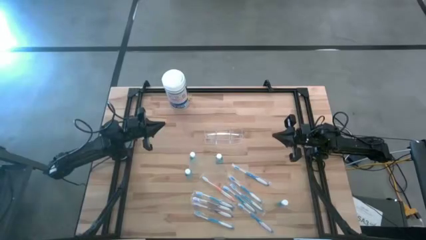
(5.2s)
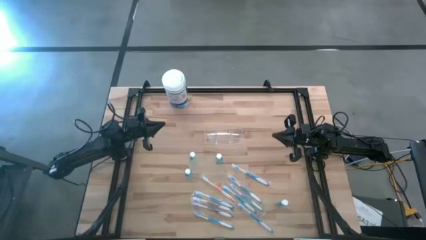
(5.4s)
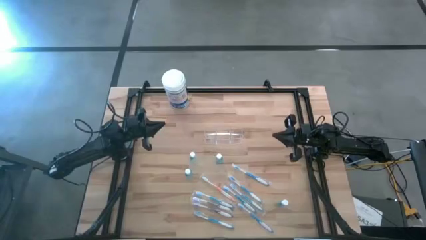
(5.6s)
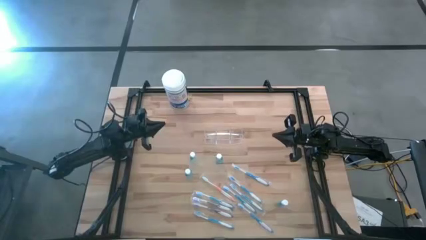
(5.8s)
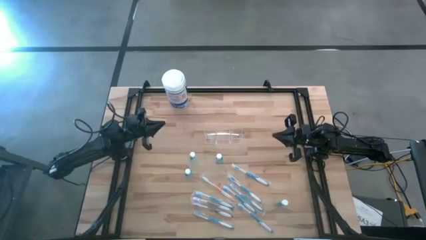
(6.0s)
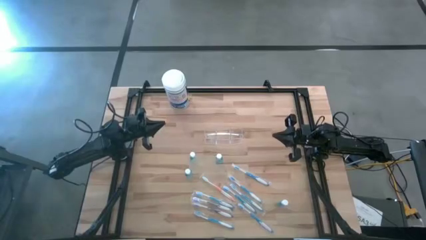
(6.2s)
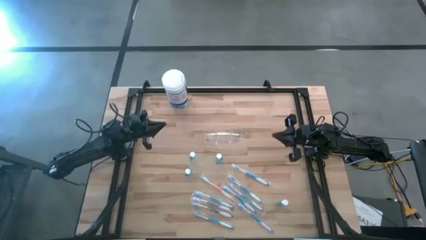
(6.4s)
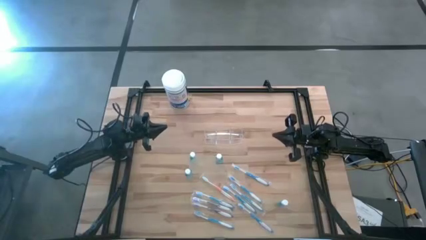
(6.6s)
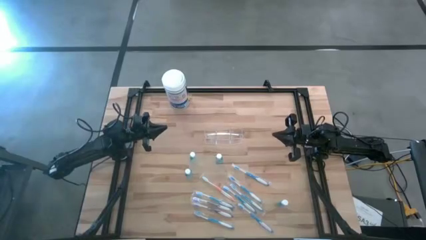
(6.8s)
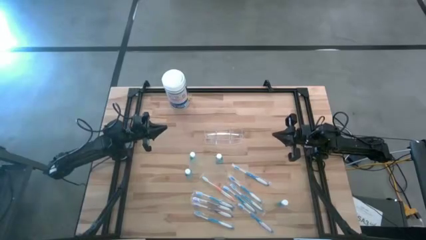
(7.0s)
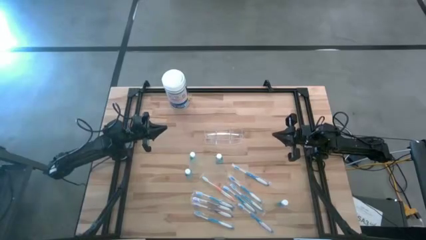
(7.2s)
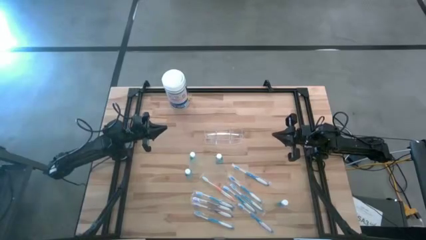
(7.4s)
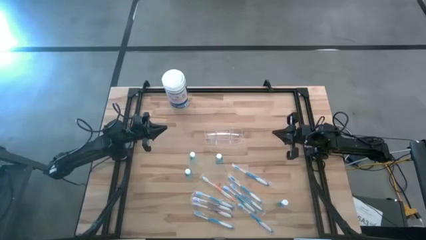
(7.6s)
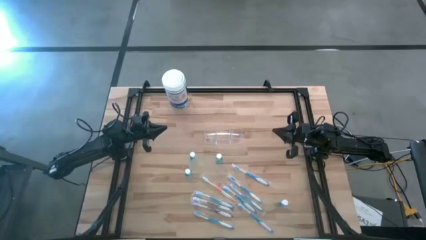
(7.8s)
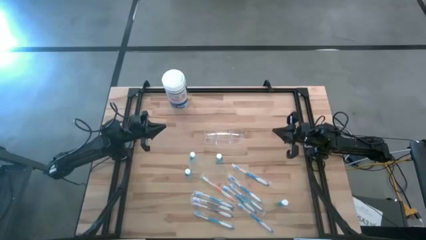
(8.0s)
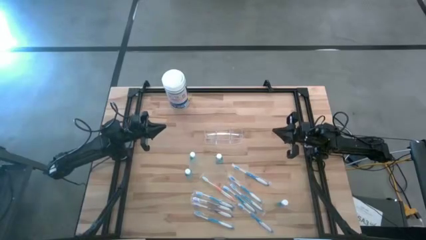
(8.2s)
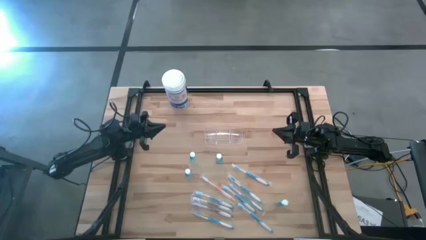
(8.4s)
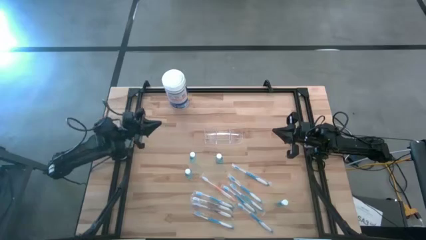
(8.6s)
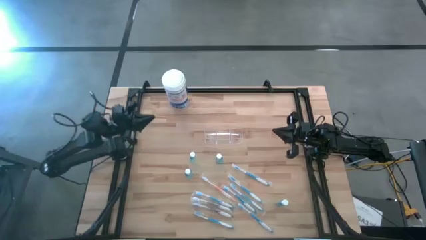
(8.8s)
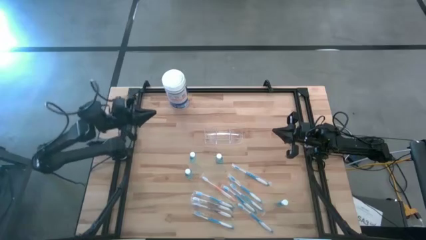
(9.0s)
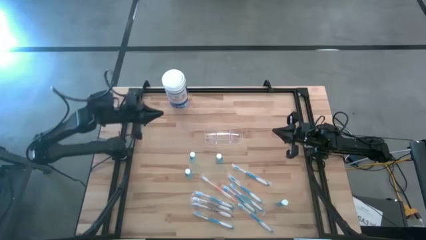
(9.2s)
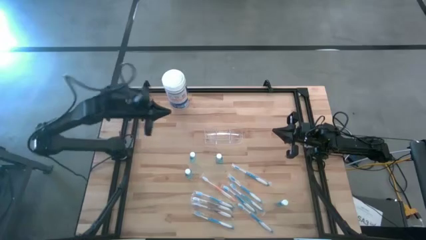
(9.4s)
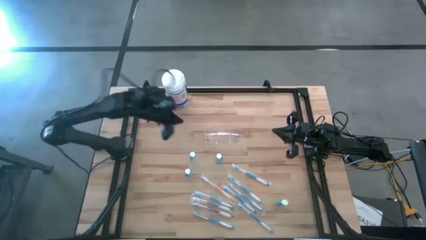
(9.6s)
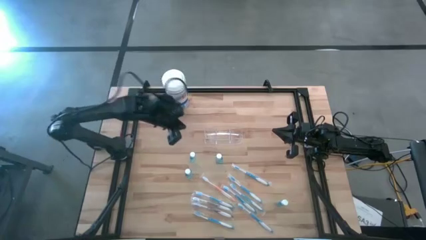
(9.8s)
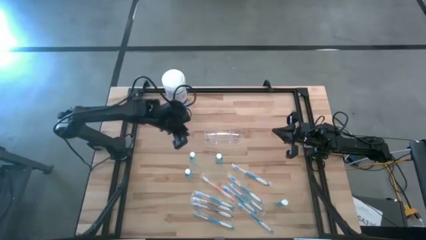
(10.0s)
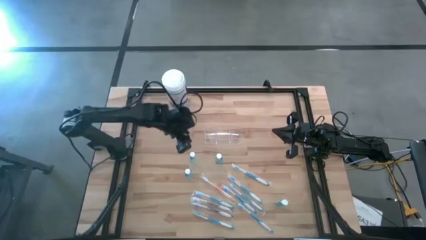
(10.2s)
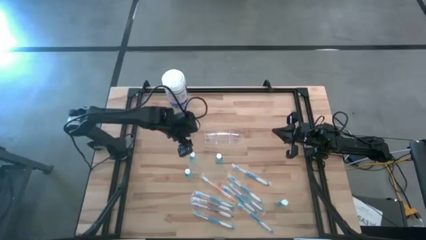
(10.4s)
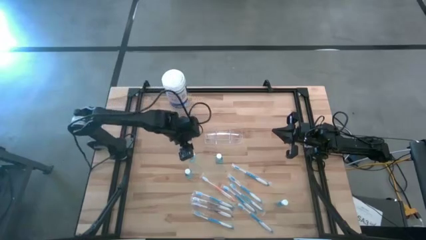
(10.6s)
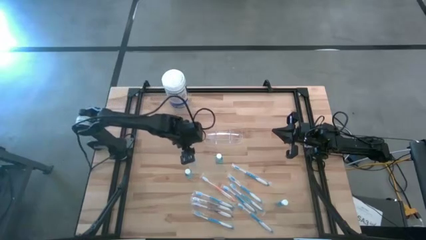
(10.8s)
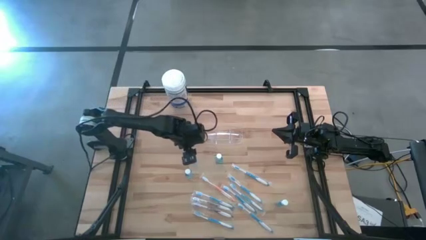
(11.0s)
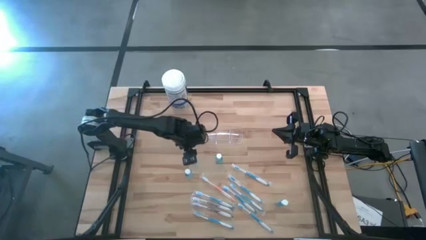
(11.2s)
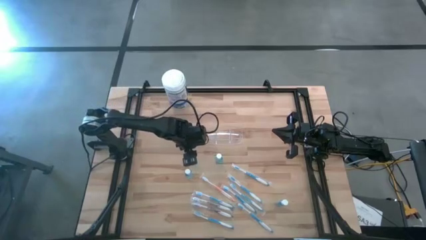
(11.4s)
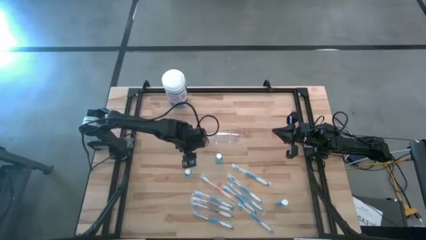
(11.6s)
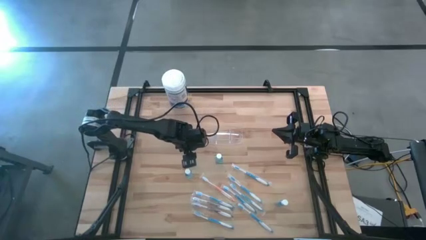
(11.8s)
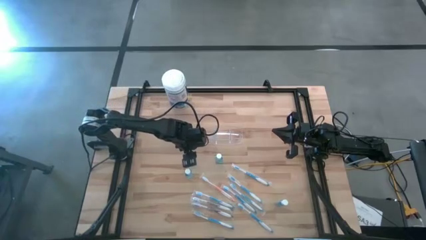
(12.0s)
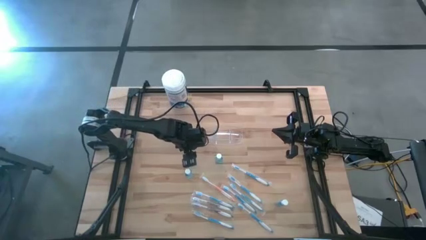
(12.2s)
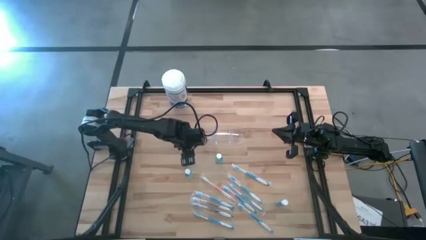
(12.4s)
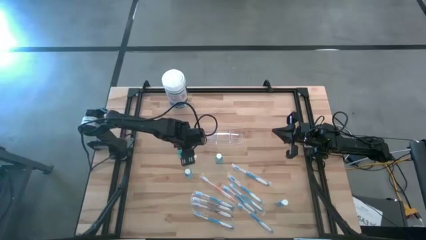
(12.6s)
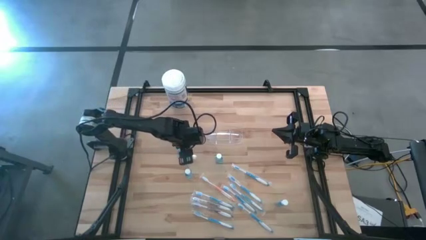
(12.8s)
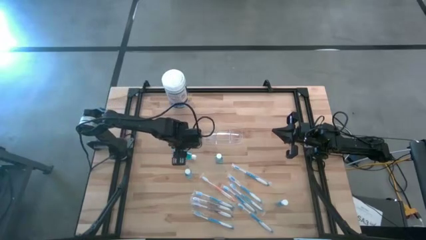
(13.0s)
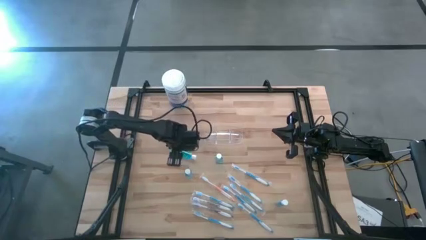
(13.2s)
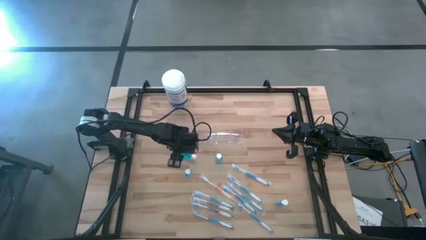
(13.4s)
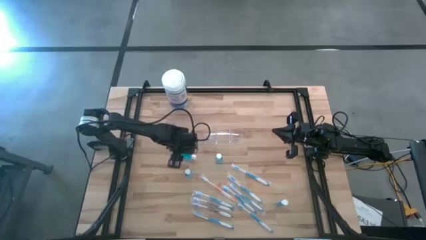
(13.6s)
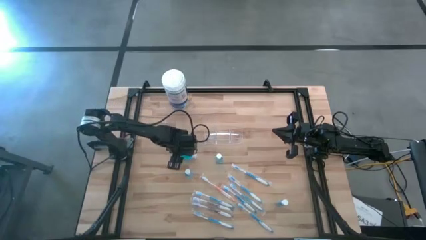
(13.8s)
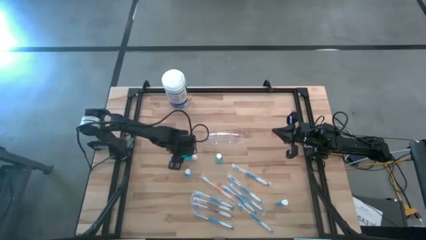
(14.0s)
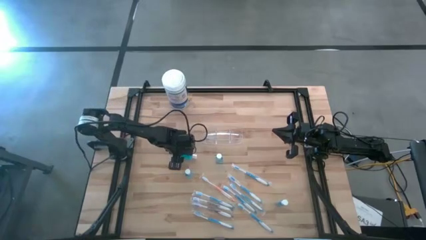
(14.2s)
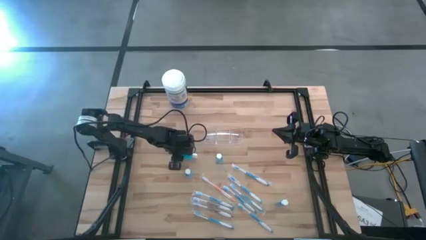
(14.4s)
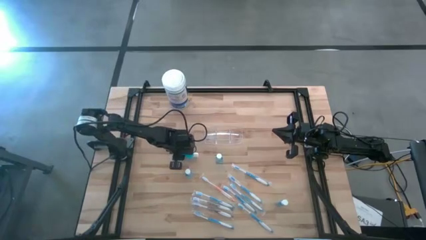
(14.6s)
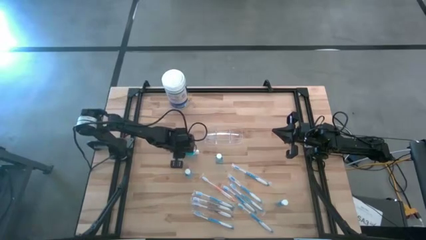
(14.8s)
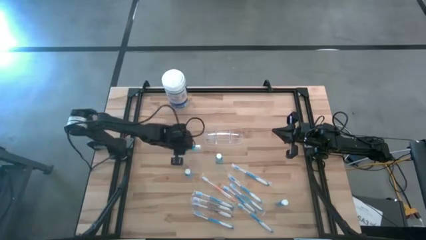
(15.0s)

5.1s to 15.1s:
Task: Pick & Place toothbrushing station
Put the blue mouthwash in the transparent organizer

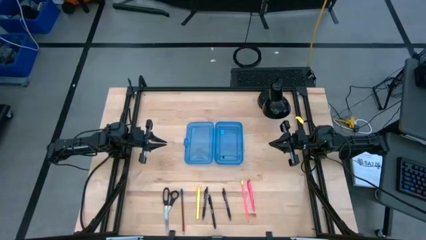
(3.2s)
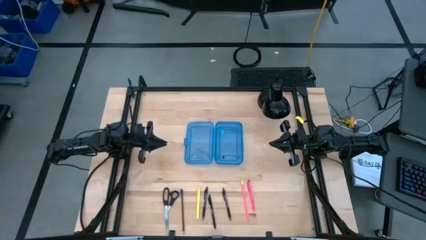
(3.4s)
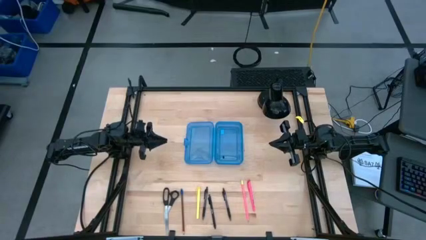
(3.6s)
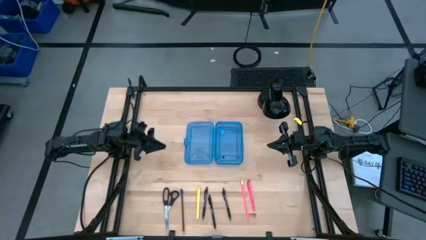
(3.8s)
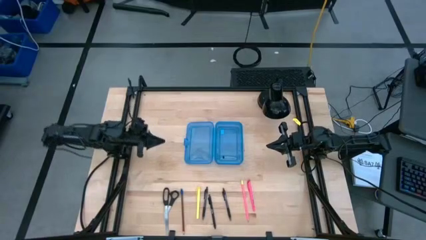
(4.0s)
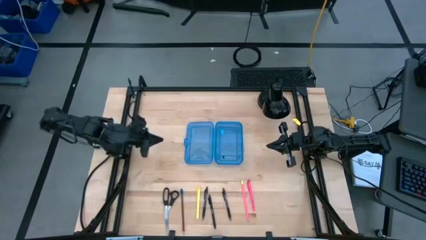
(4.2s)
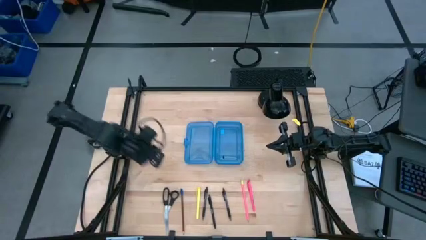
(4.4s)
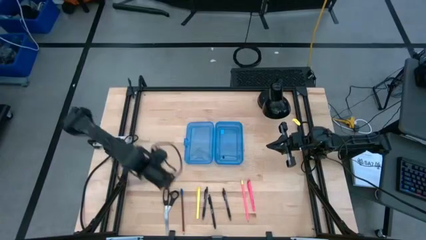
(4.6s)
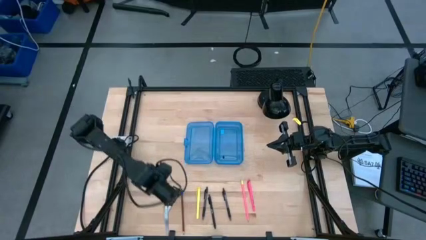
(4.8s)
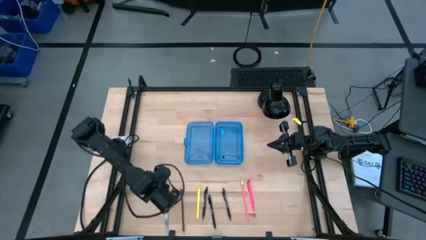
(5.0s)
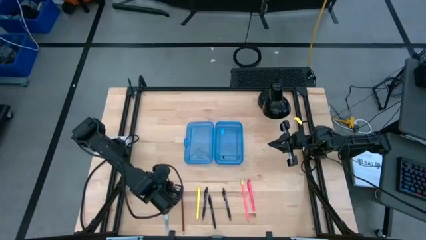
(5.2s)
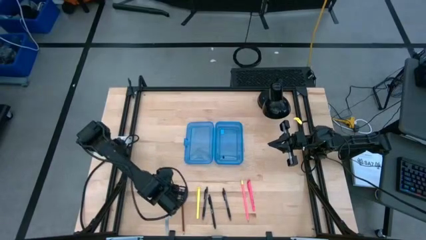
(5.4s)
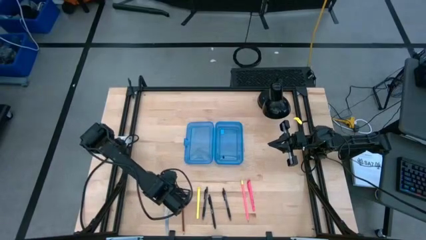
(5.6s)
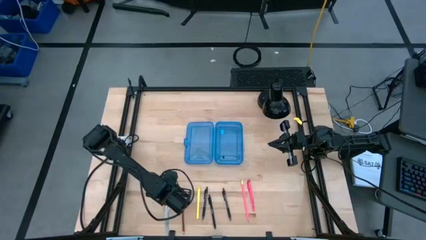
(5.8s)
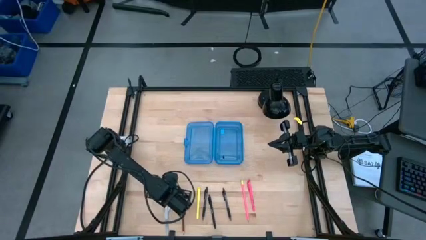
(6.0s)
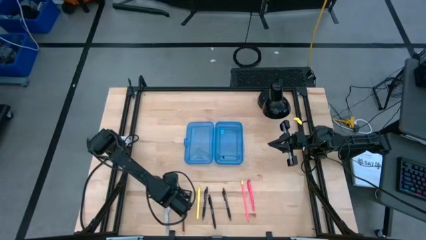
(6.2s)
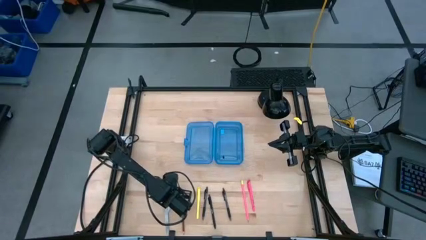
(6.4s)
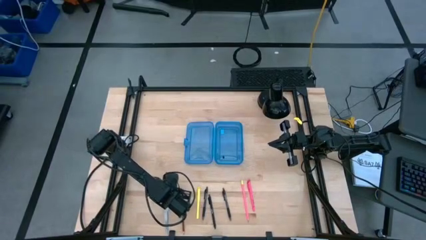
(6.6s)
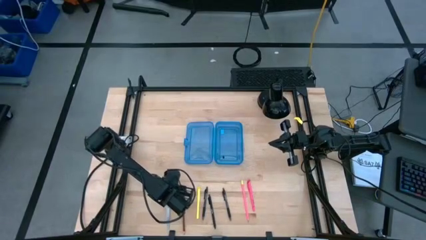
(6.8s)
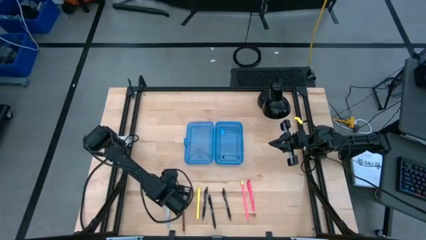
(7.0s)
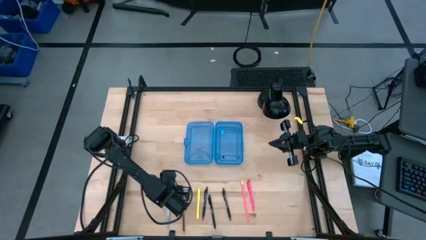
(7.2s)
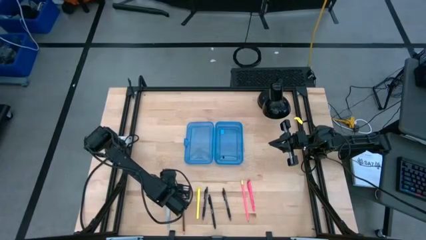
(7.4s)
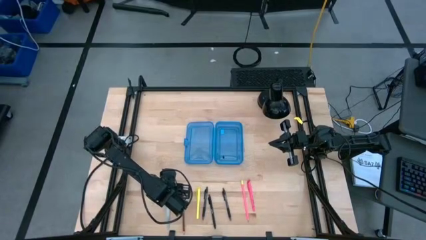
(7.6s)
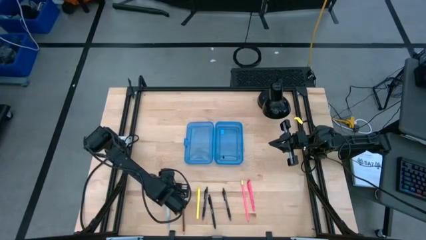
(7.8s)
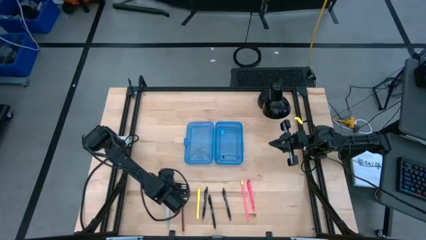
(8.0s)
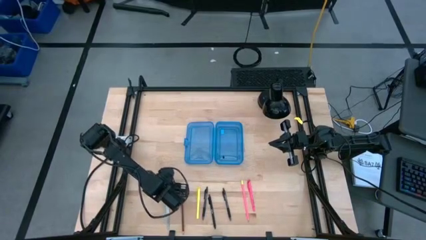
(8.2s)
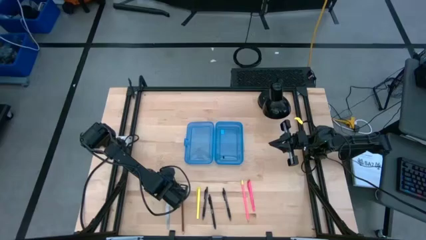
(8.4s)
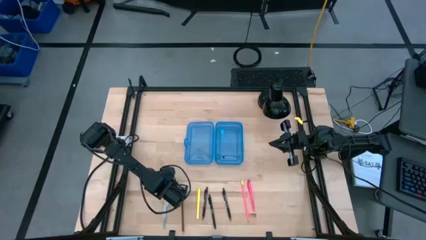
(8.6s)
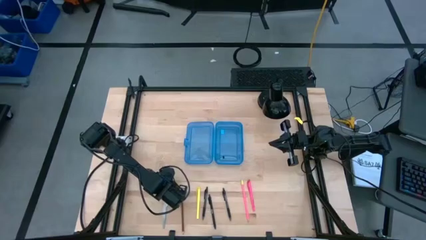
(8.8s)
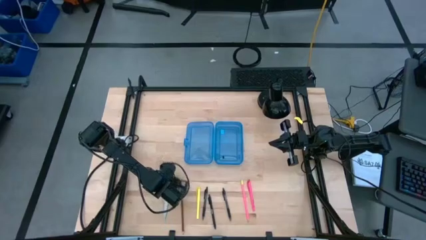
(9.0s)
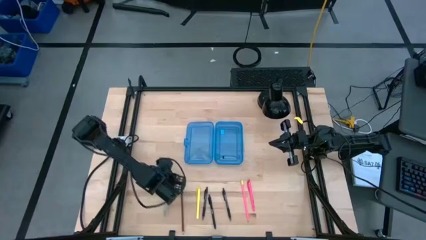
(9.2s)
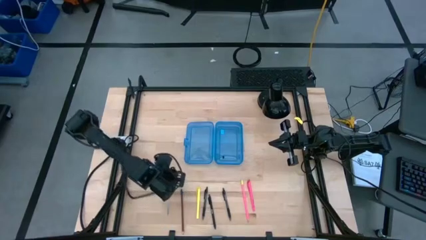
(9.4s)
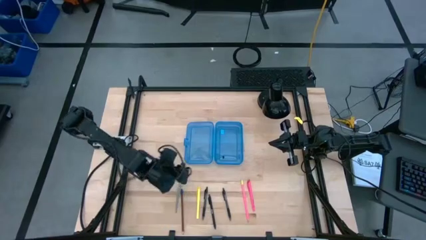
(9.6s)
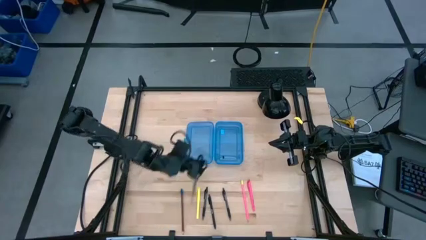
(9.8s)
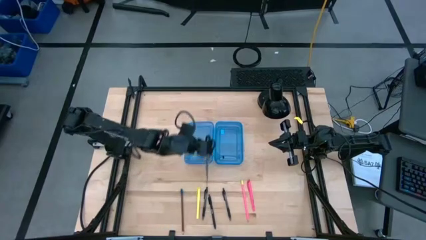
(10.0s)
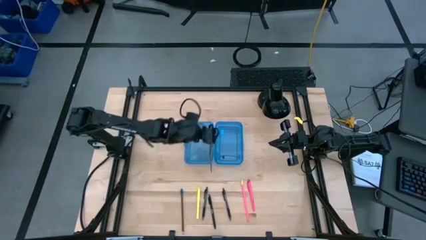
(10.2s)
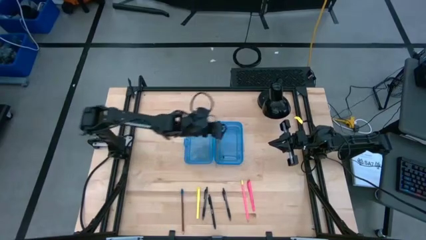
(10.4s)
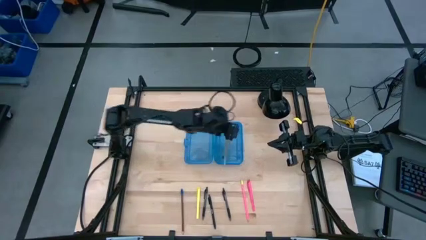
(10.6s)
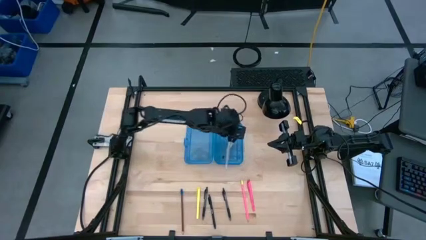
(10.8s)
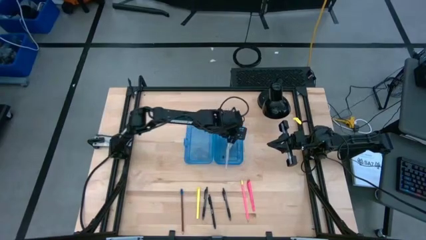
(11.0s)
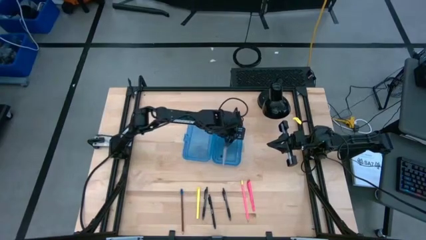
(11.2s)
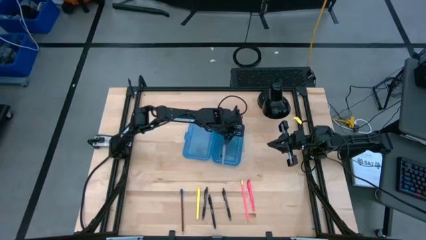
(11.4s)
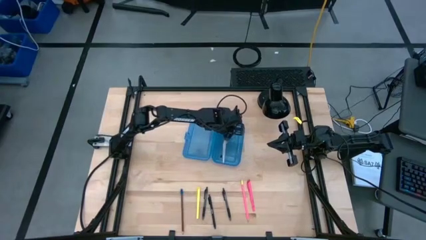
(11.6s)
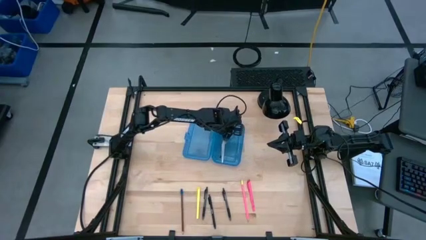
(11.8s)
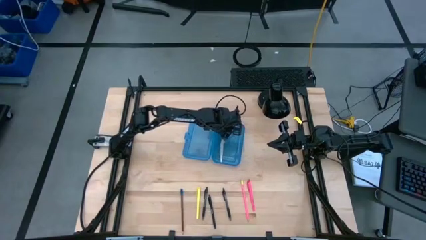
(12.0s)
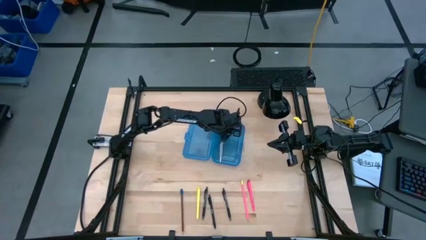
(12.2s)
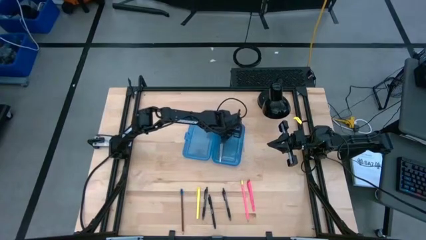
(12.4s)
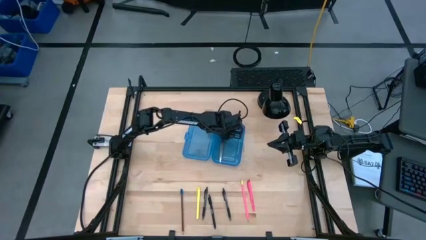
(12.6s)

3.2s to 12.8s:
Task: Pick & place school supplies into a supply box
Put the scissors into the supply box
